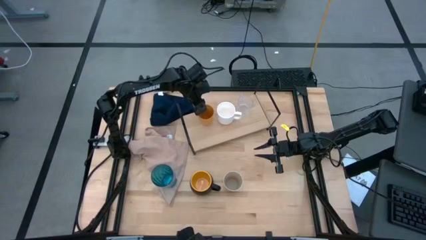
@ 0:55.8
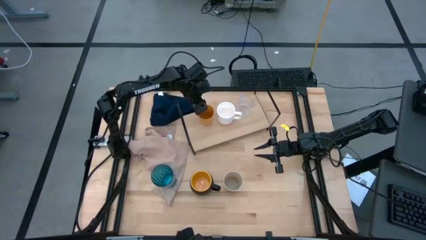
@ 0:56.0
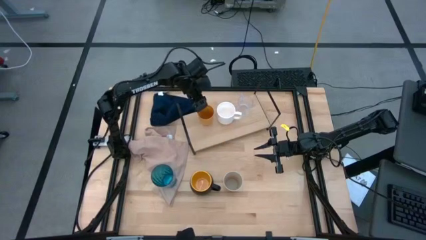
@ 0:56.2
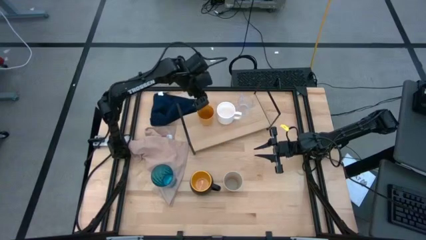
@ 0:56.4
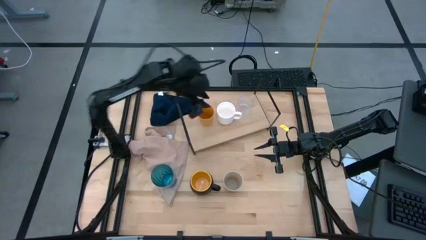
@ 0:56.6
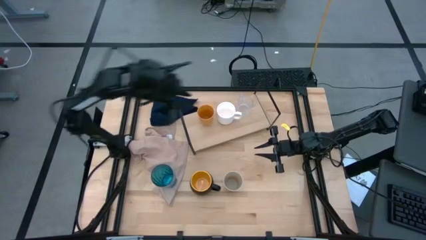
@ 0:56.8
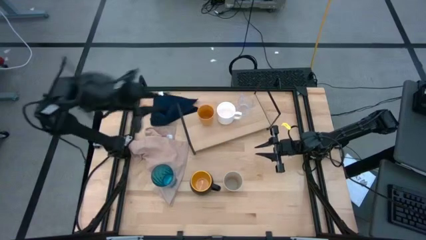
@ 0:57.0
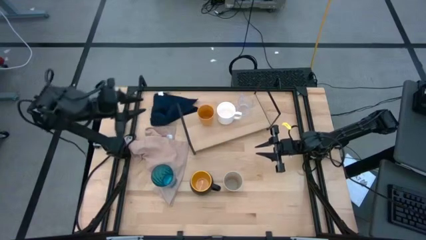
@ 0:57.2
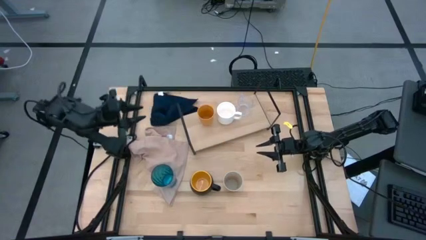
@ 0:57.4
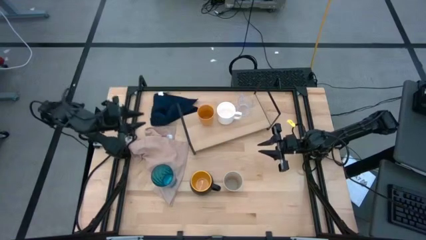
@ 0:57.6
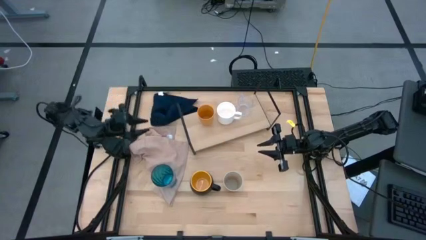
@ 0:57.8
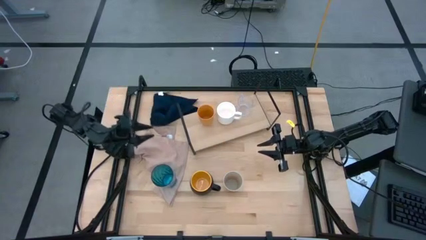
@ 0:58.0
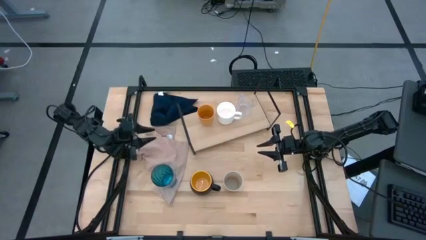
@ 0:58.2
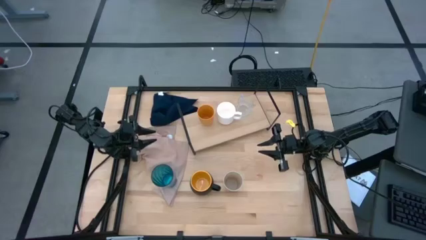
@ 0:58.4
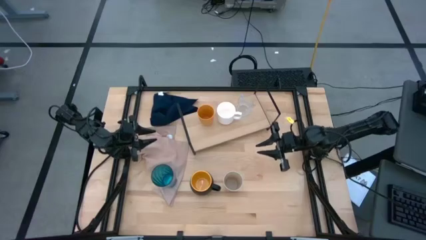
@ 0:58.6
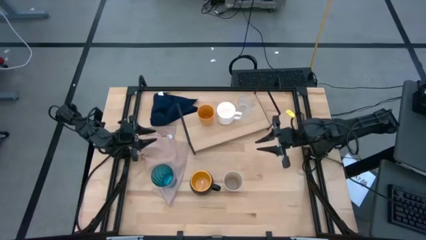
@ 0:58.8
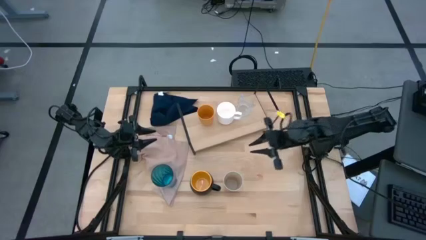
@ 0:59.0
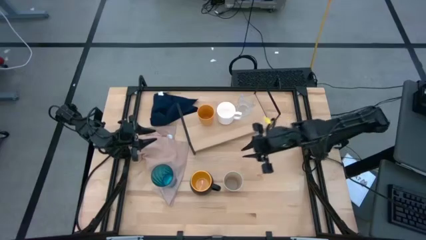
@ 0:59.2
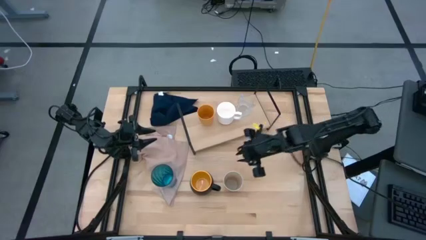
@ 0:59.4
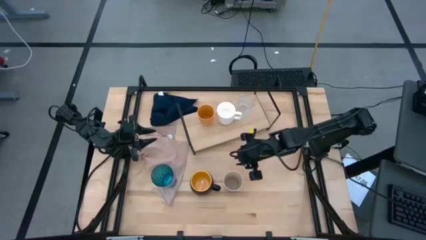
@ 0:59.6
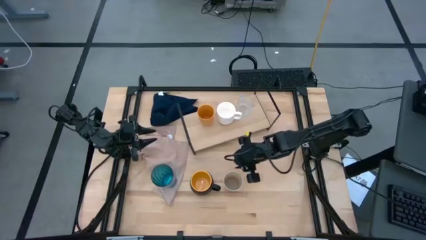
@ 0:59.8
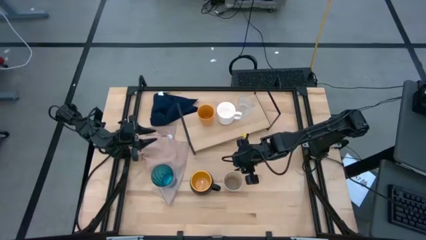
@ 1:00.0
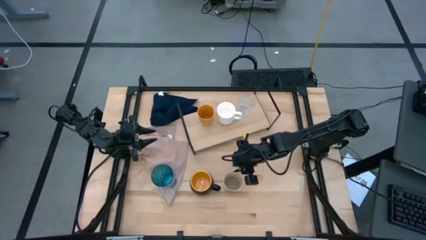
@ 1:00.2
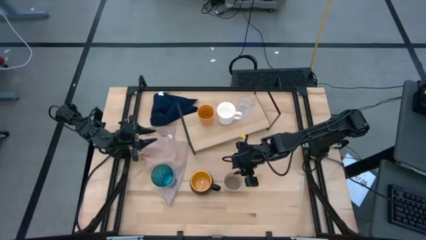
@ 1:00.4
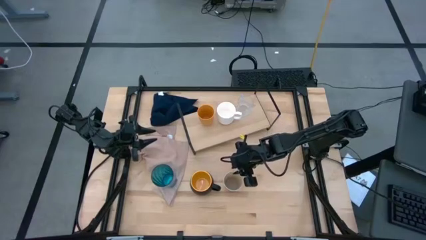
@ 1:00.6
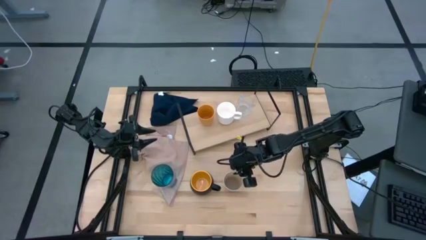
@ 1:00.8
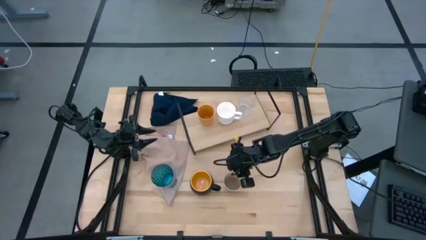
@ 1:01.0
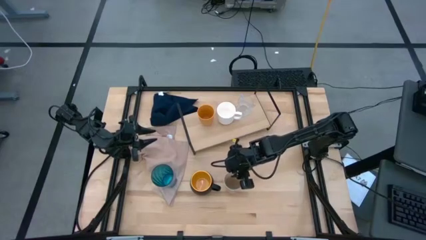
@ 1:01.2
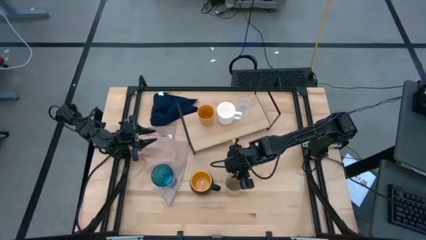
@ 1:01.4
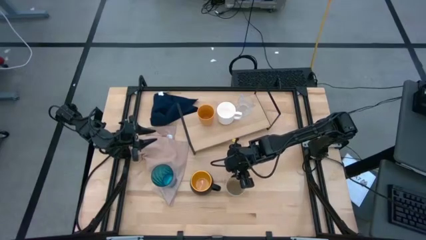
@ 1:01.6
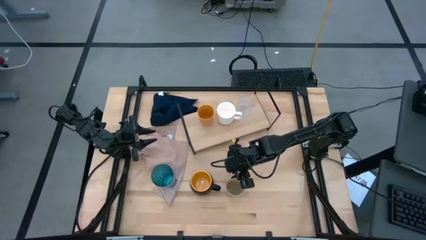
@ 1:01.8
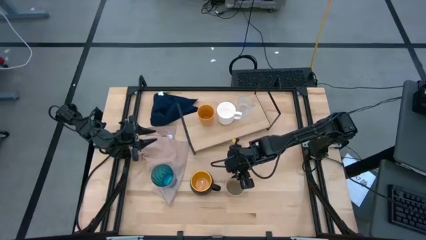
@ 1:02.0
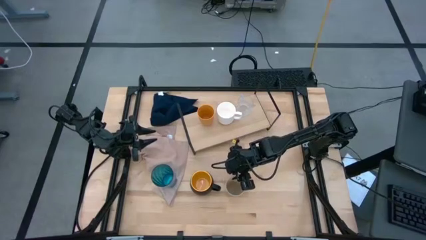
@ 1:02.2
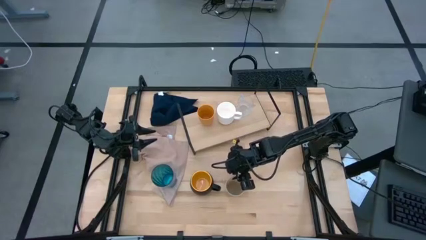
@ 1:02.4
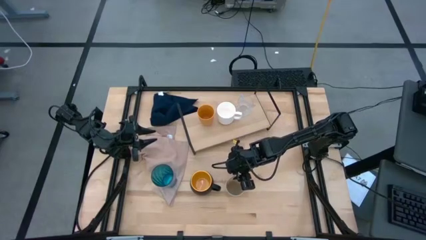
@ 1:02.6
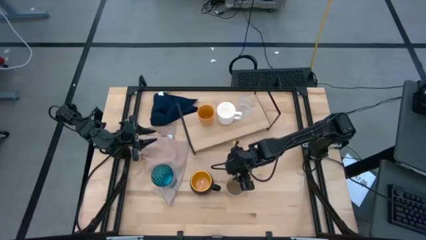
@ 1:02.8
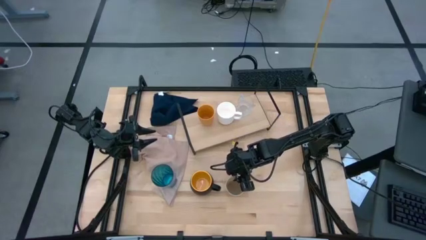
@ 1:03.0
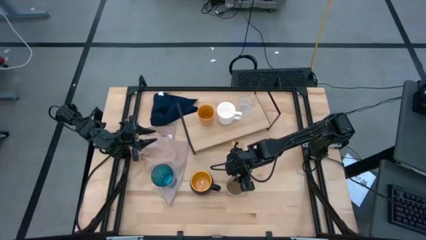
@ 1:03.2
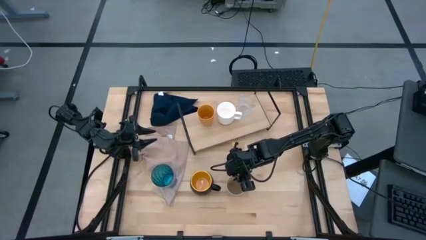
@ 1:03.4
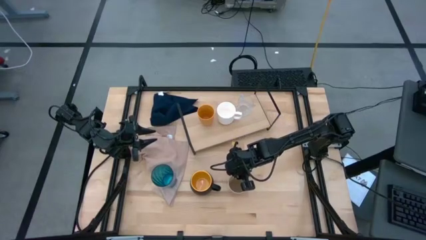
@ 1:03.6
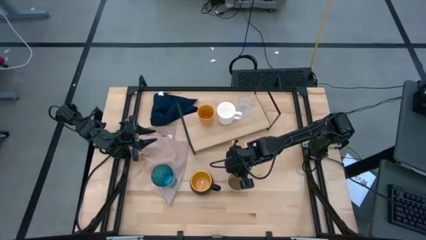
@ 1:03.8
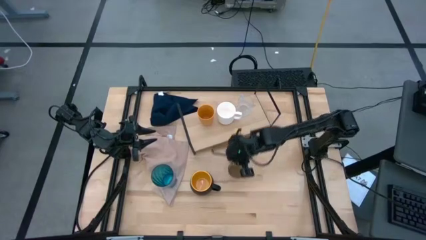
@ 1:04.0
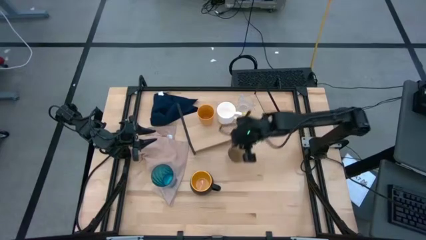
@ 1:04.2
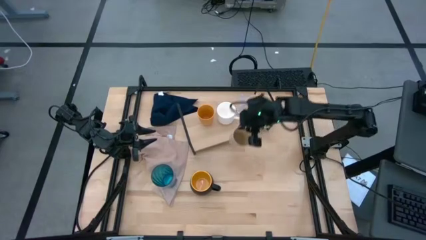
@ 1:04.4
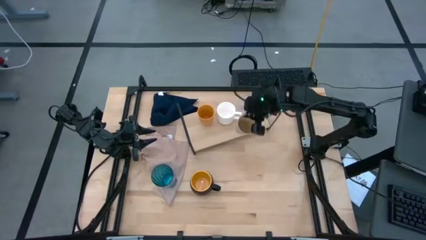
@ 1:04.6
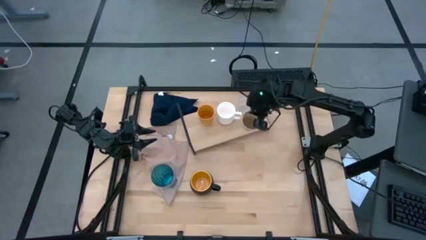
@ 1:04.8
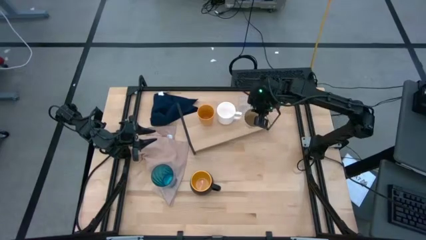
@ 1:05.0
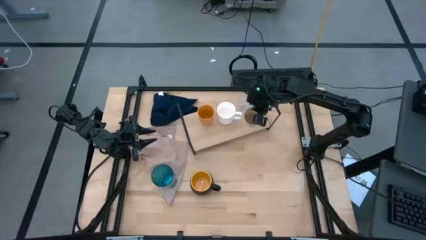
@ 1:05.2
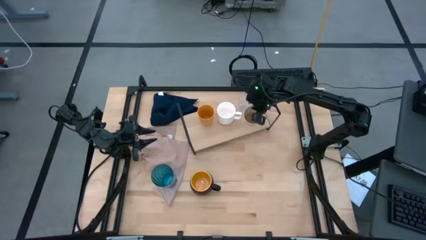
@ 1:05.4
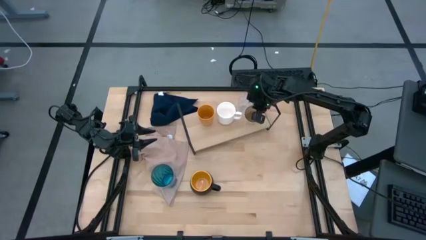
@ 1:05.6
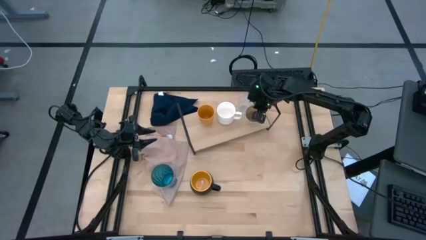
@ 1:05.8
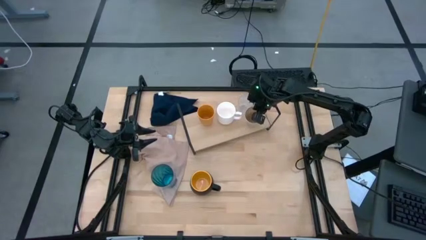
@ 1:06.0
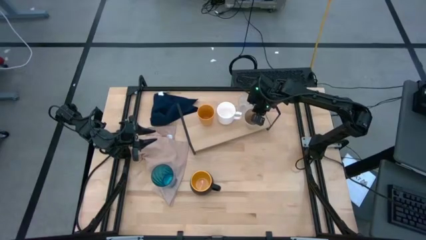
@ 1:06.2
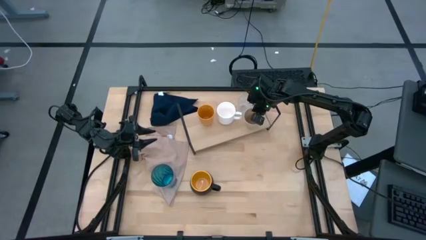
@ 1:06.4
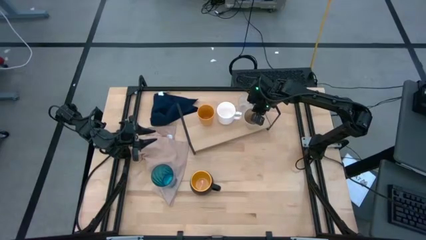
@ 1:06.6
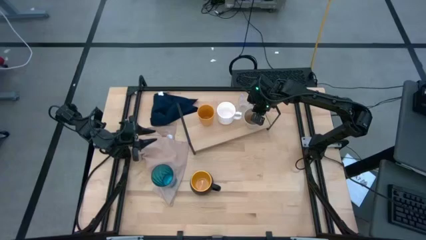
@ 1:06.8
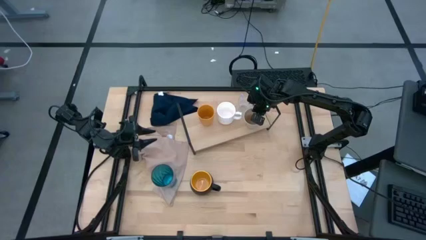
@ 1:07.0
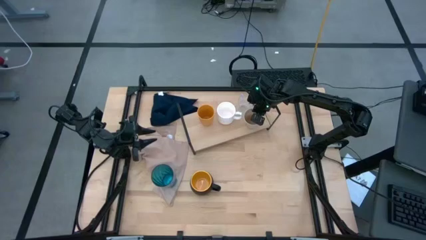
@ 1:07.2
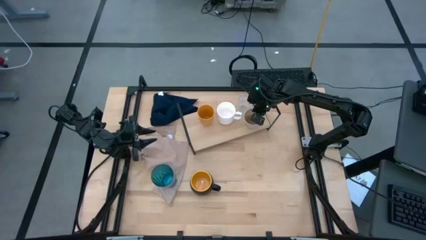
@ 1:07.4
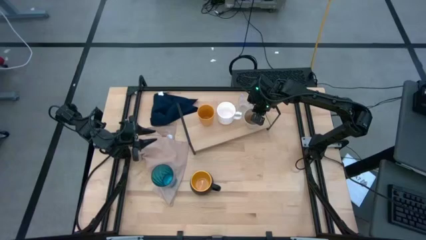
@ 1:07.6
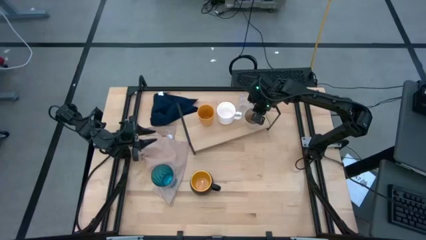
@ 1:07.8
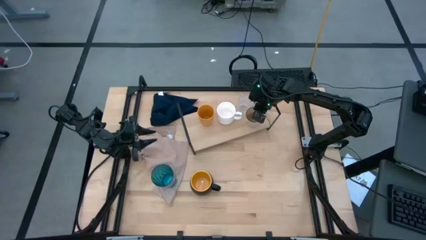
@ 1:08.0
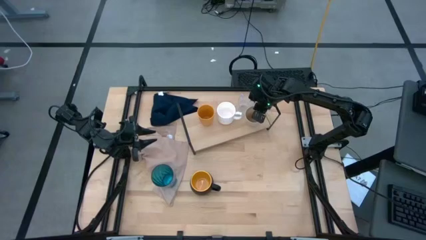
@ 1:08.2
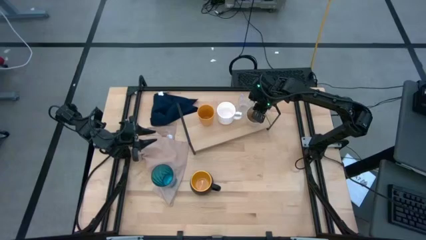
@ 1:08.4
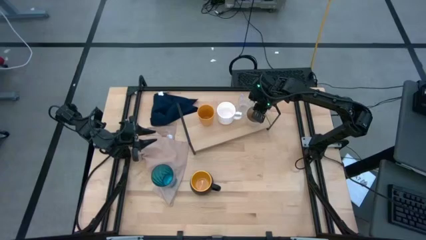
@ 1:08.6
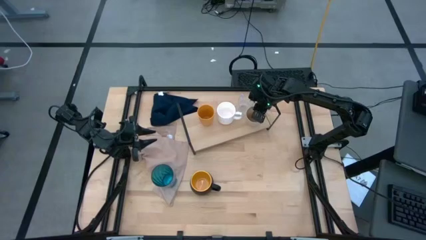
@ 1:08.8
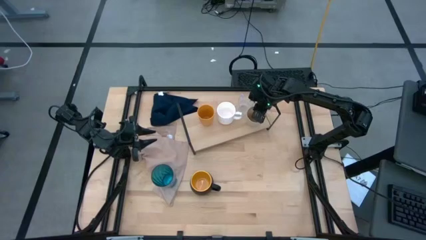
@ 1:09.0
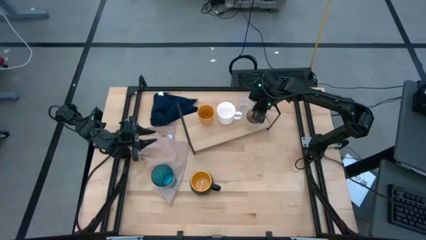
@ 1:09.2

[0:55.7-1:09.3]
Task: Stack small to large cups/mugs on shelf
Put the gray cup on the shelf aligned with the other transparent cup
